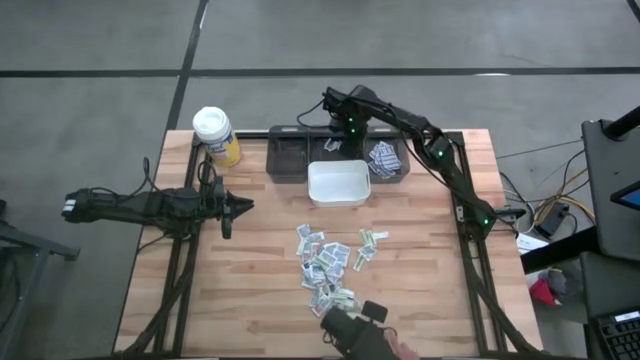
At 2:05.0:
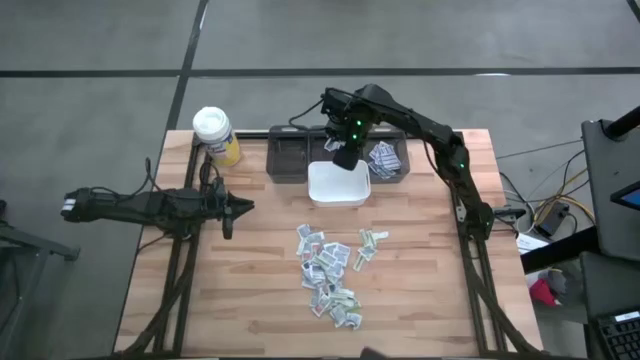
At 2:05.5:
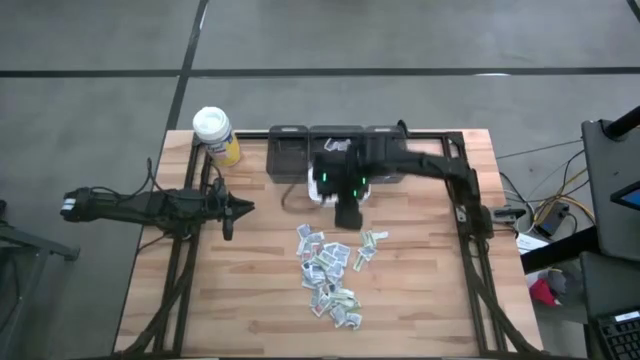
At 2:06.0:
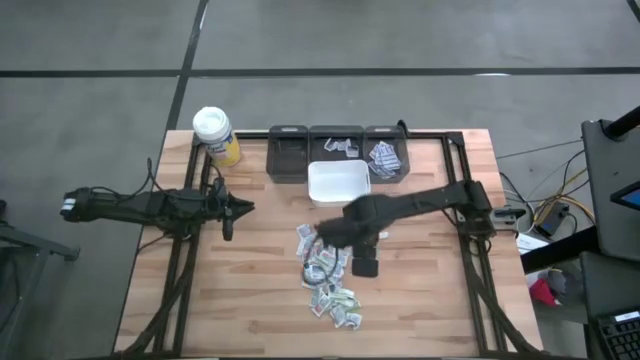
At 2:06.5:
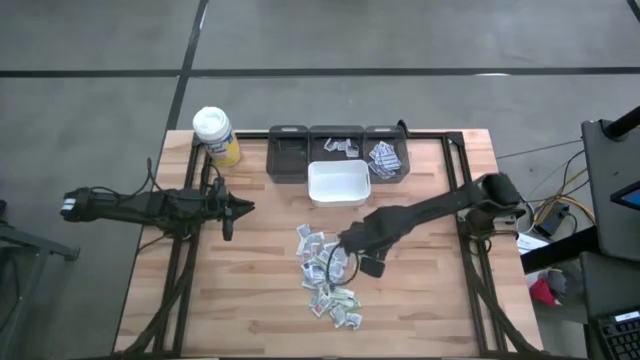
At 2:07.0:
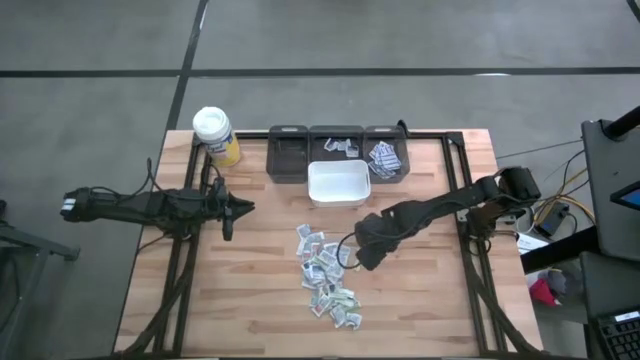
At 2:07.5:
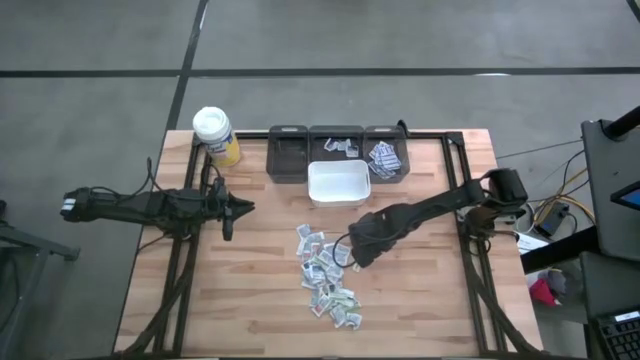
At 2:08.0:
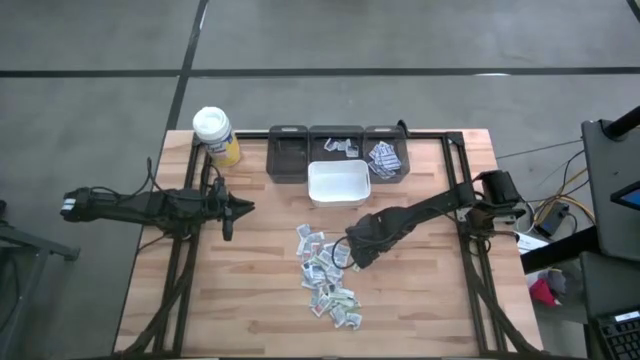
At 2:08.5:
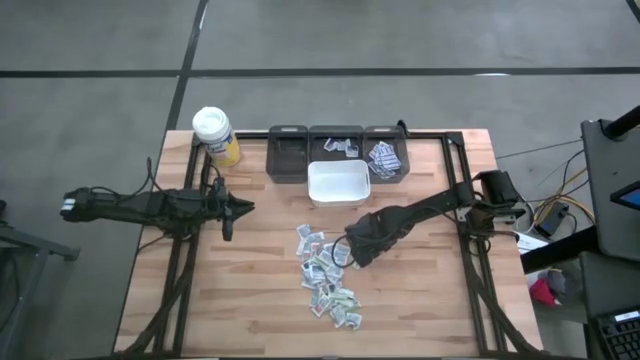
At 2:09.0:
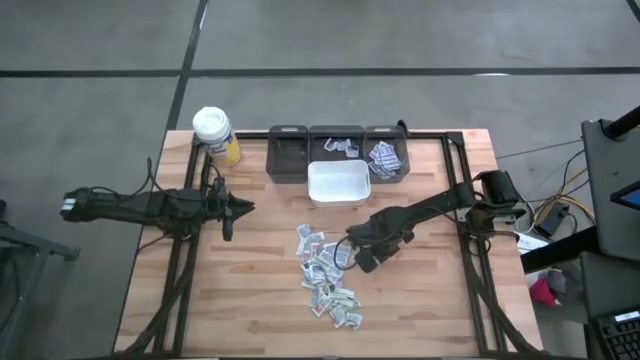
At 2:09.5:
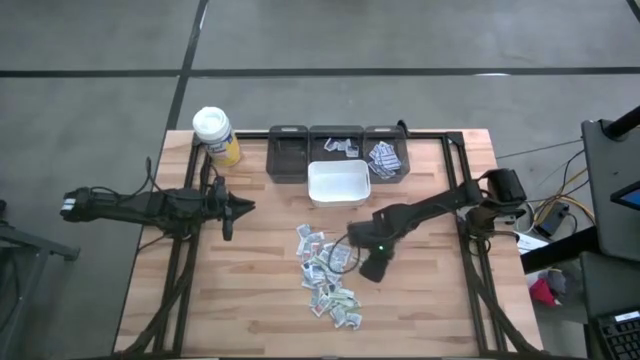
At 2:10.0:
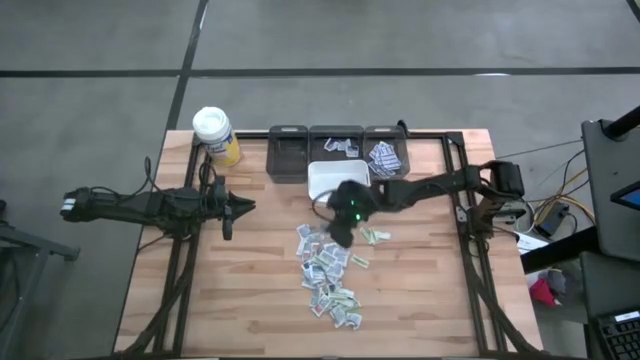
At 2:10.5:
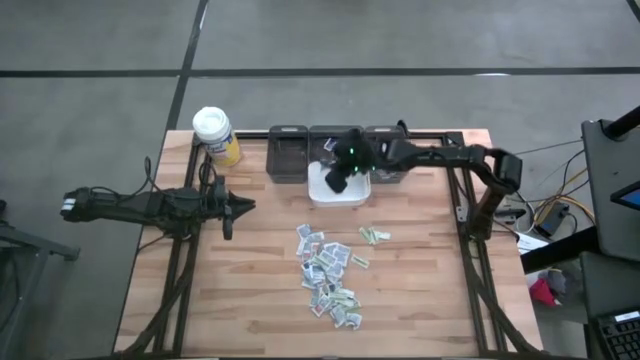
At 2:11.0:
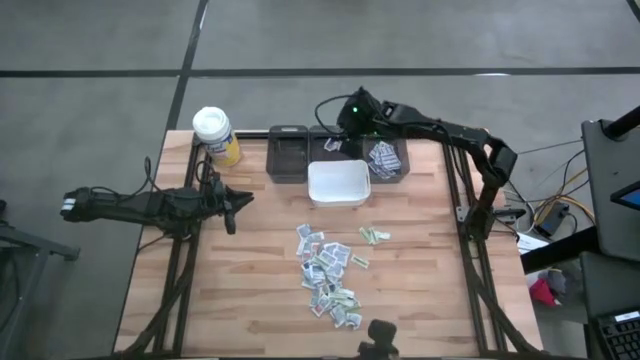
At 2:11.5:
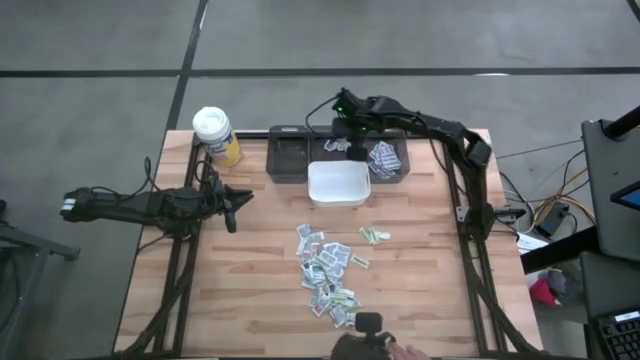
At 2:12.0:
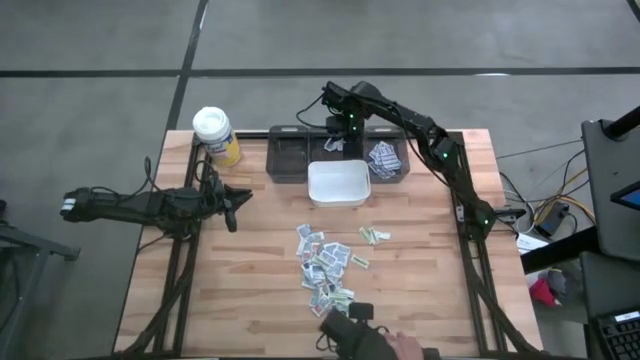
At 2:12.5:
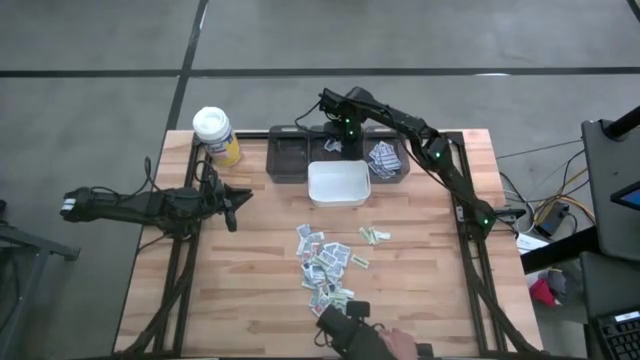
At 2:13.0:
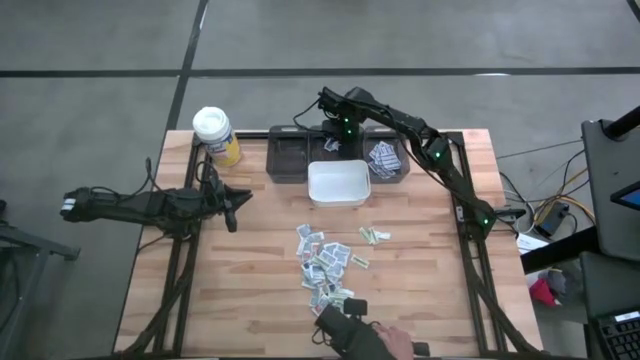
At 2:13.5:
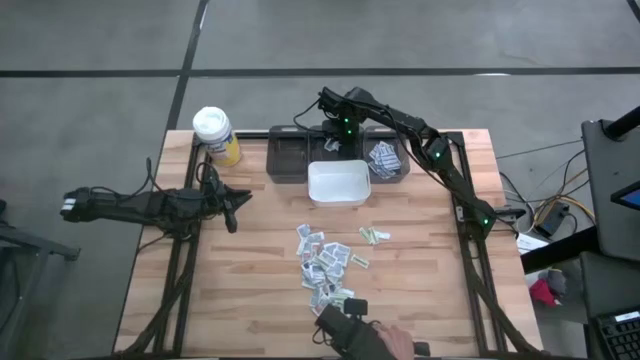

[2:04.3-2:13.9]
Task: Pick & Place First Aid Supplies
Put the alcohol pad into the middle black bin

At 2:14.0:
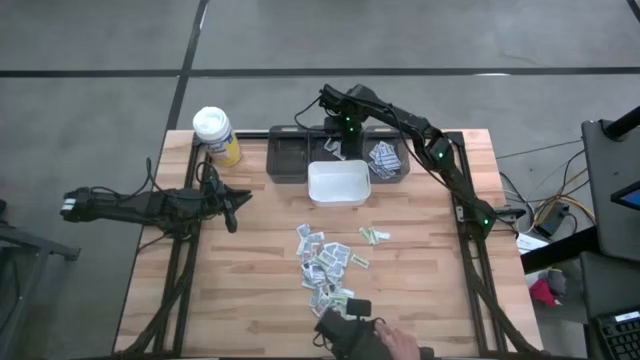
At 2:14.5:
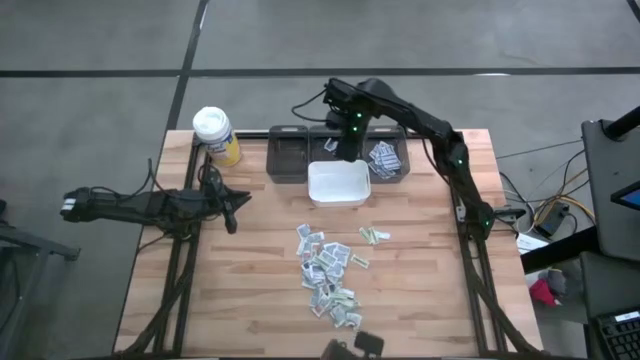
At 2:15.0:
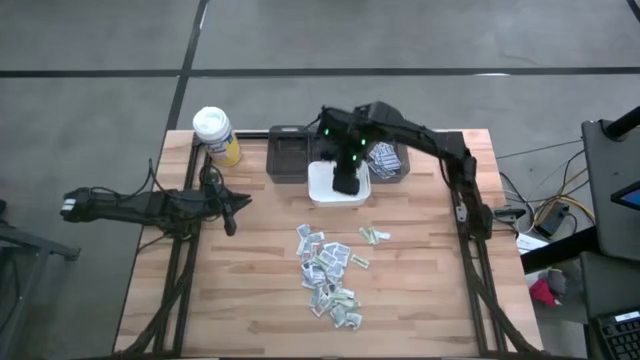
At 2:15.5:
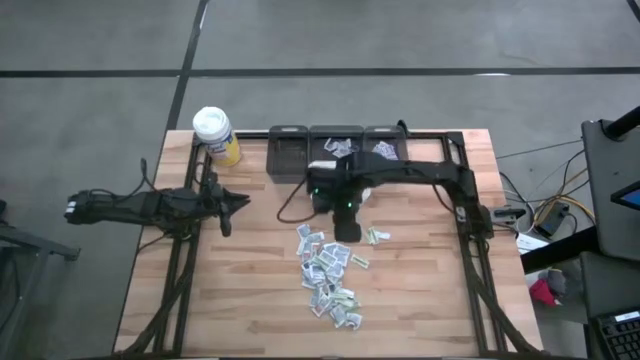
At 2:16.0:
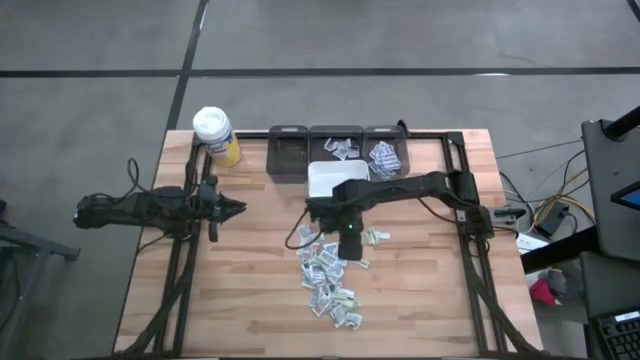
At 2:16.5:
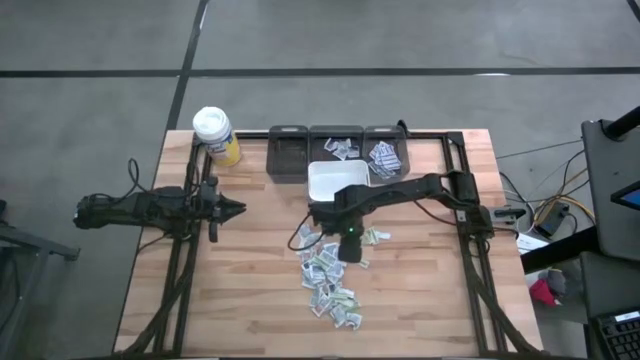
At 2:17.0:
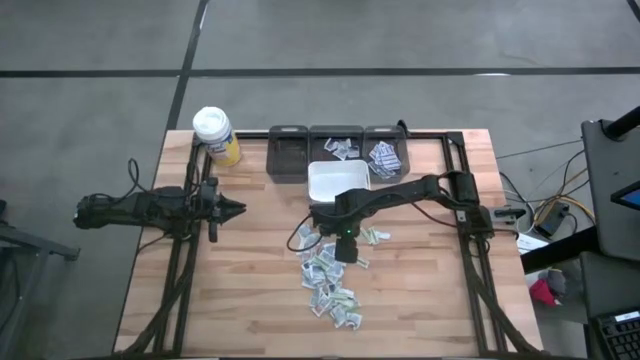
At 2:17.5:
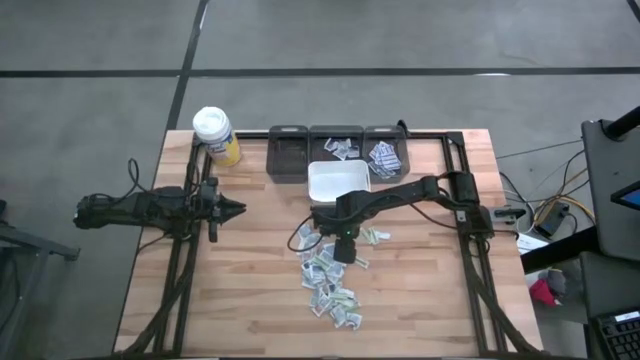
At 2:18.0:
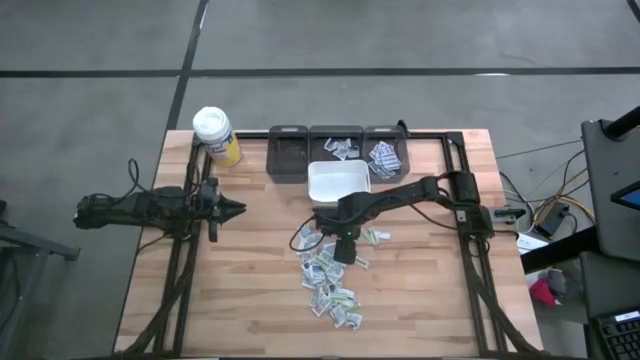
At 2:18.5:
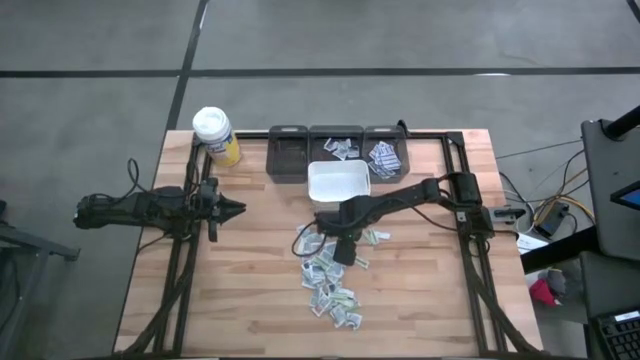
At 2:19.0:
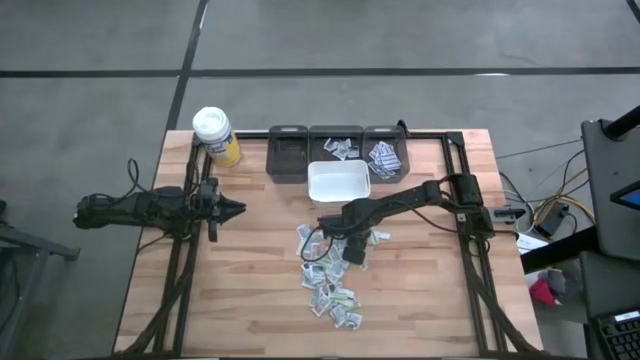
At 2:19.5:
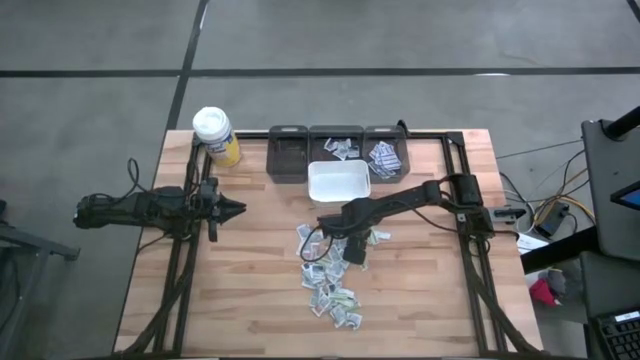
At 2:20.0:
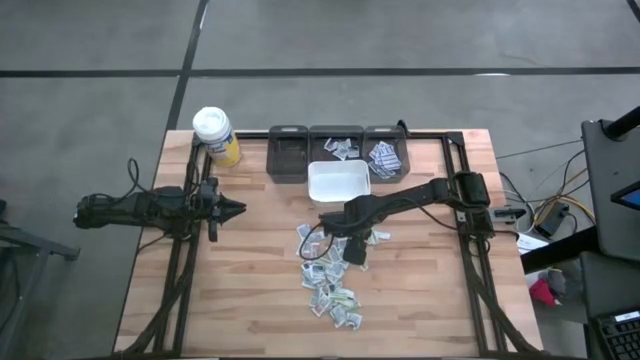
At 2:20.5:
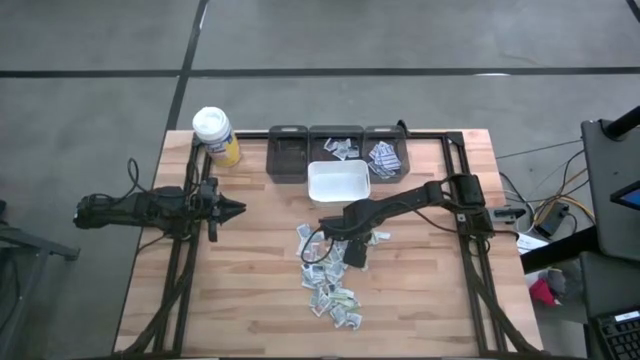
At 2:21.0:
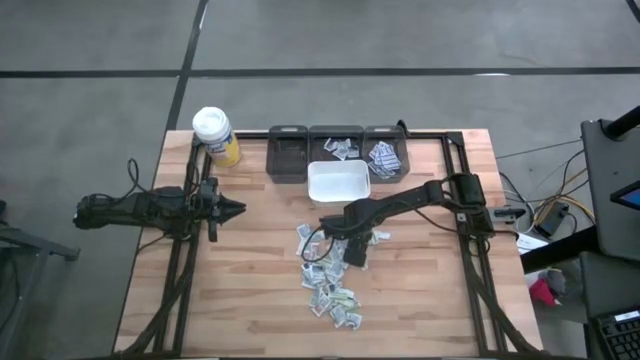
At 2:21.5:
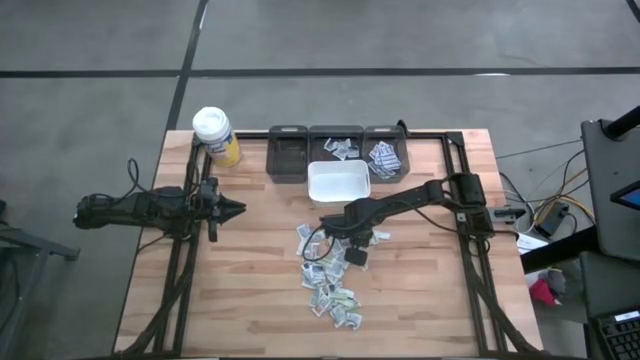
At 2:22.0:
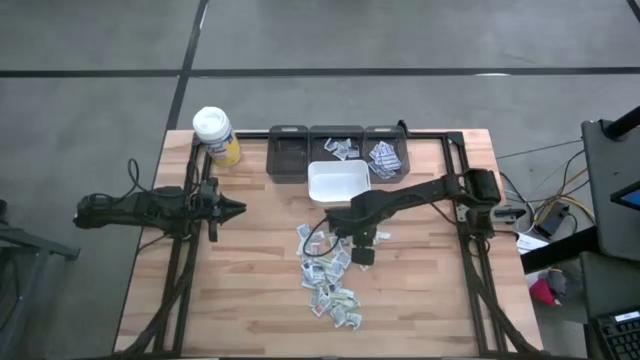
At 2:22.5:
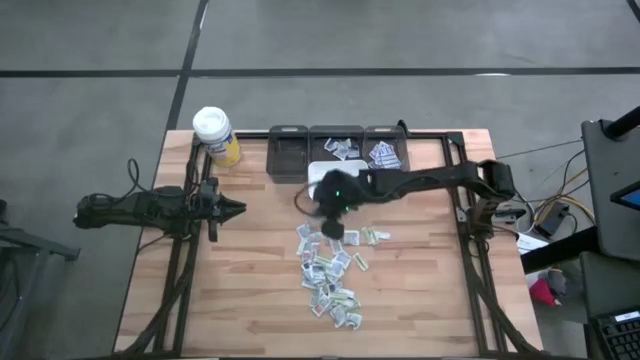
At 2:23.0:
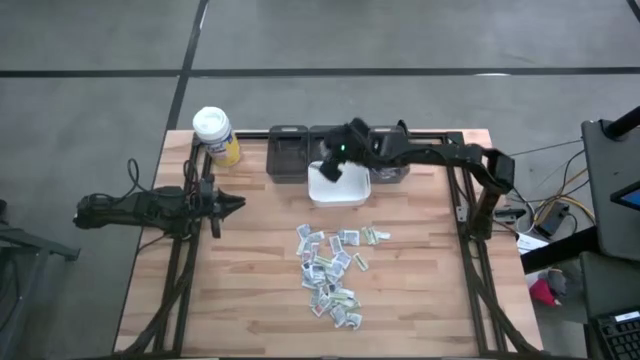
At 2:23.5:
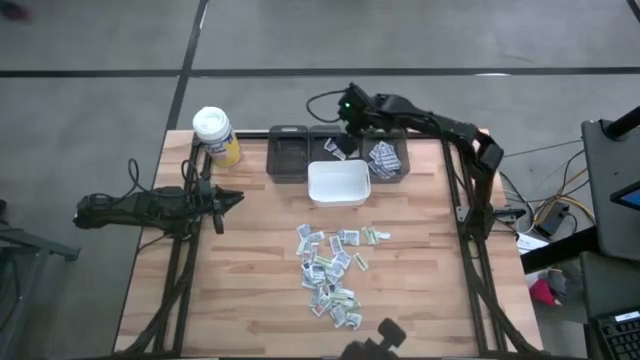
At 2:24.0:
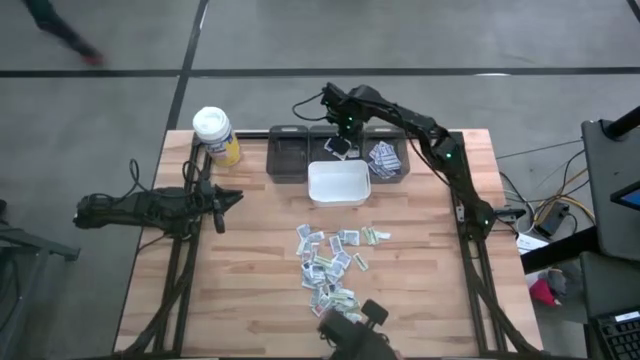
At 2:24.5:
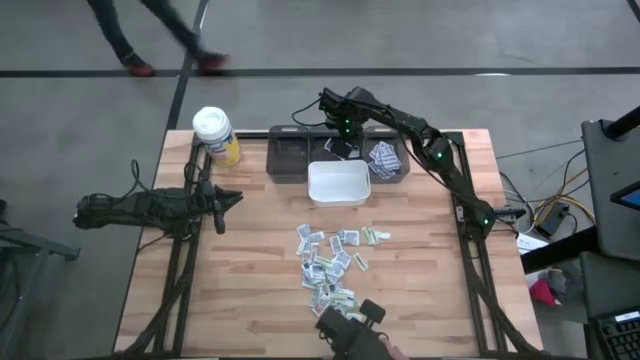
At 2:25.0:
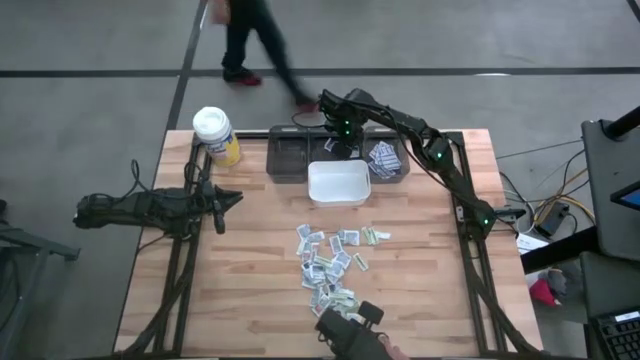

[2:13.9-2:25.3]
Put the alcohol pad into the middle black bin
